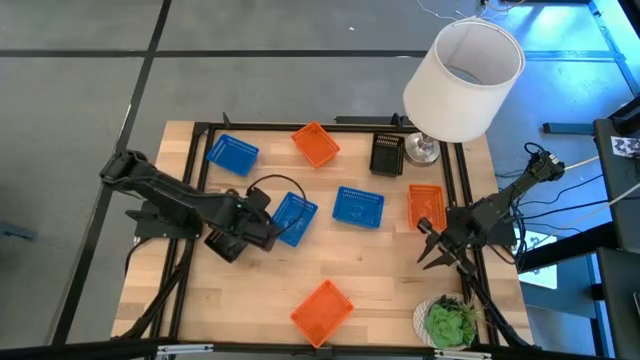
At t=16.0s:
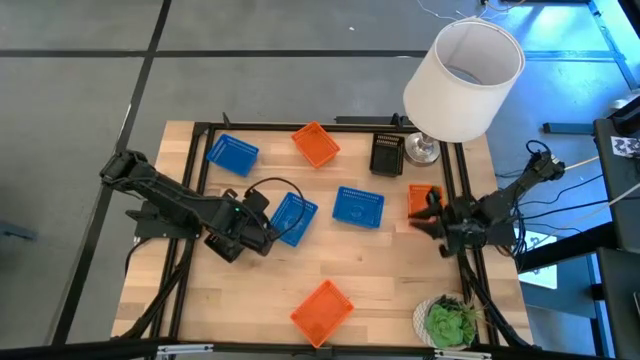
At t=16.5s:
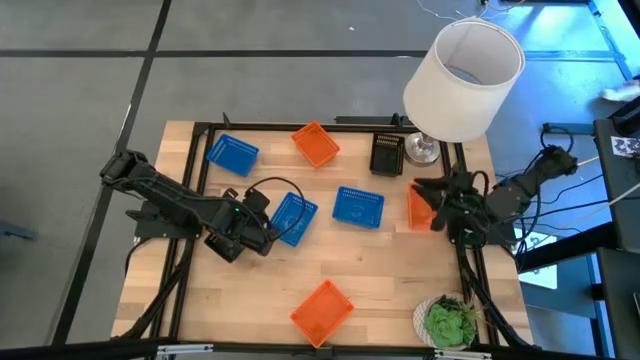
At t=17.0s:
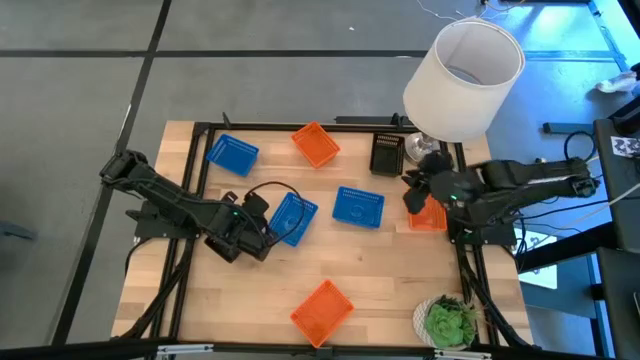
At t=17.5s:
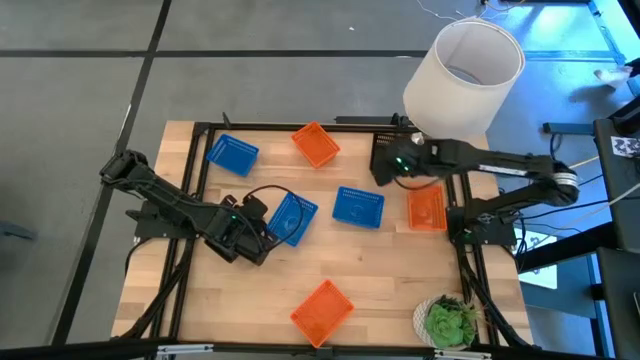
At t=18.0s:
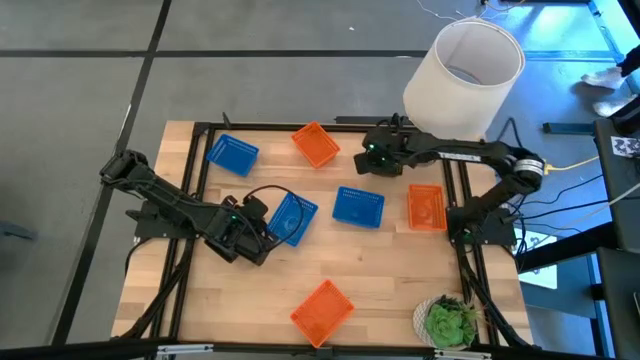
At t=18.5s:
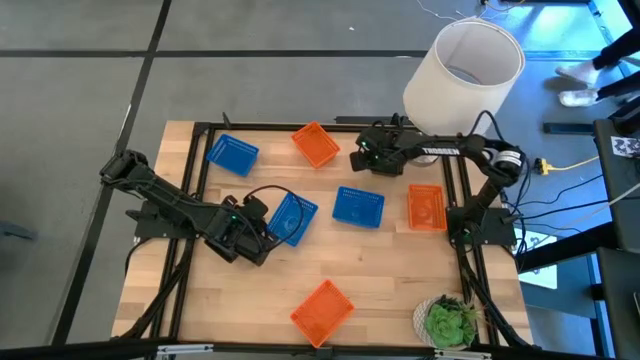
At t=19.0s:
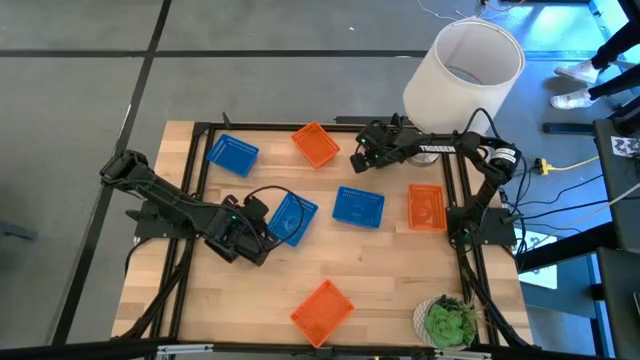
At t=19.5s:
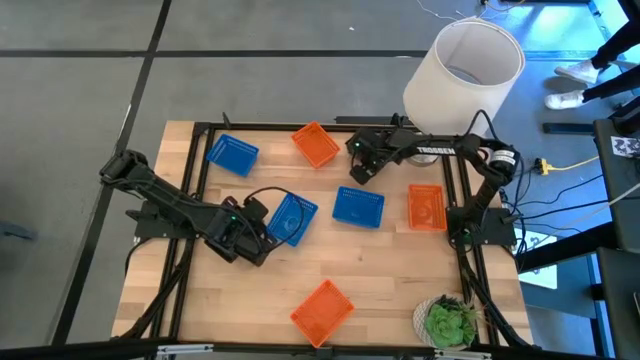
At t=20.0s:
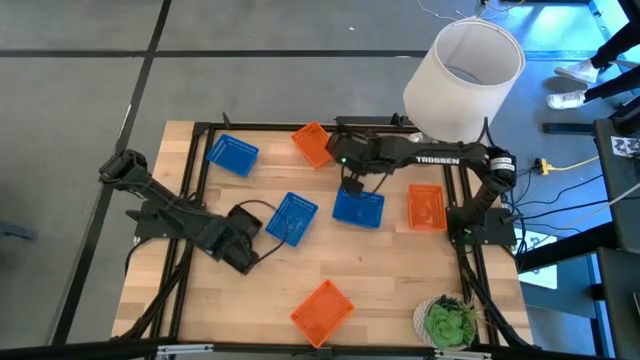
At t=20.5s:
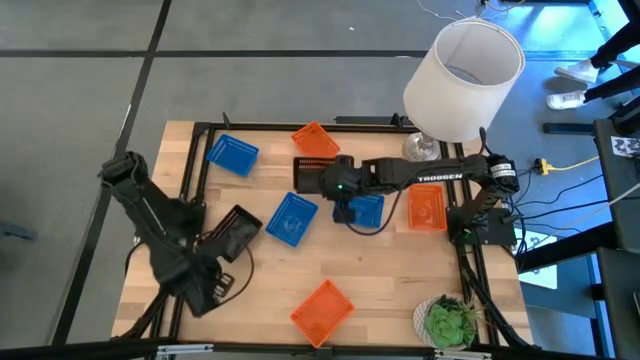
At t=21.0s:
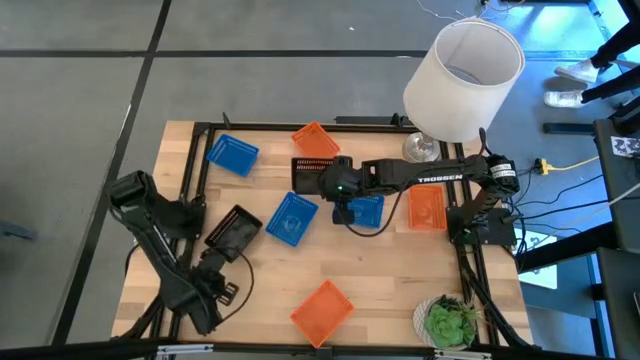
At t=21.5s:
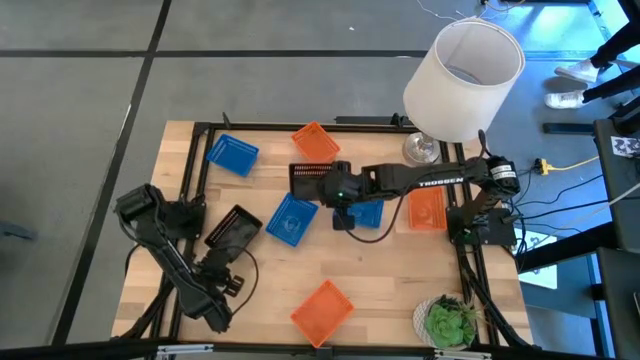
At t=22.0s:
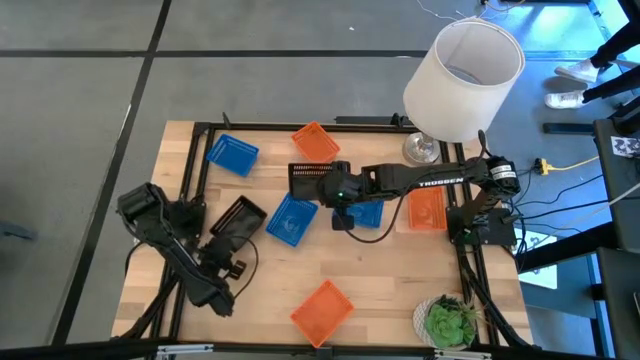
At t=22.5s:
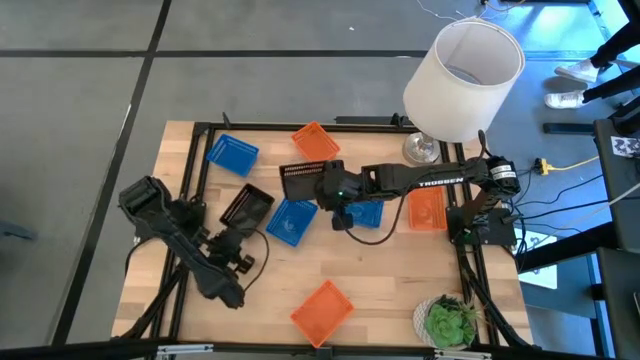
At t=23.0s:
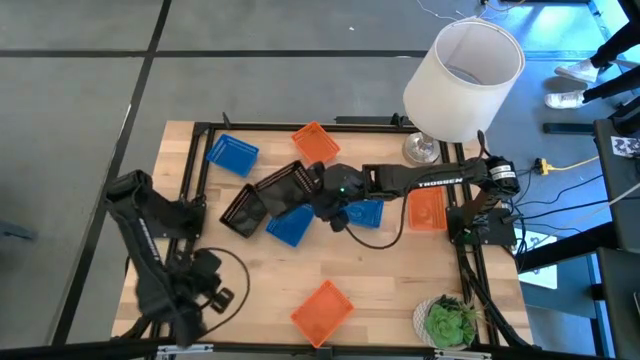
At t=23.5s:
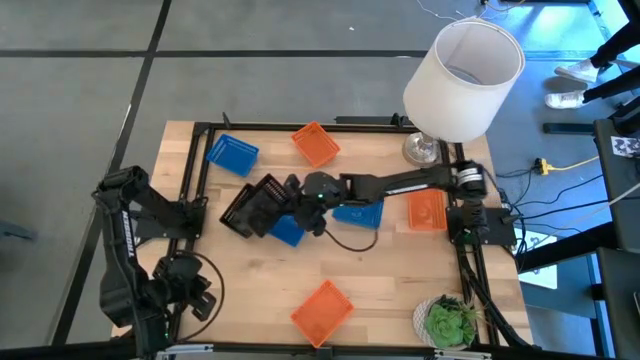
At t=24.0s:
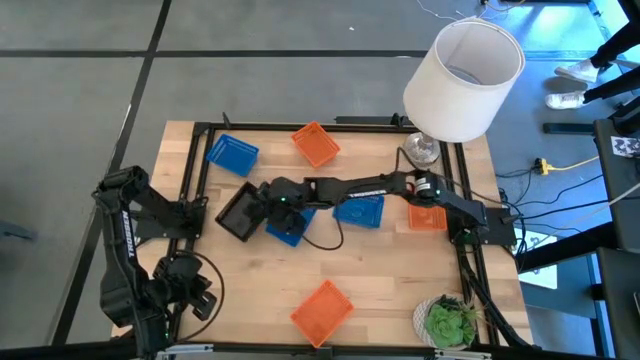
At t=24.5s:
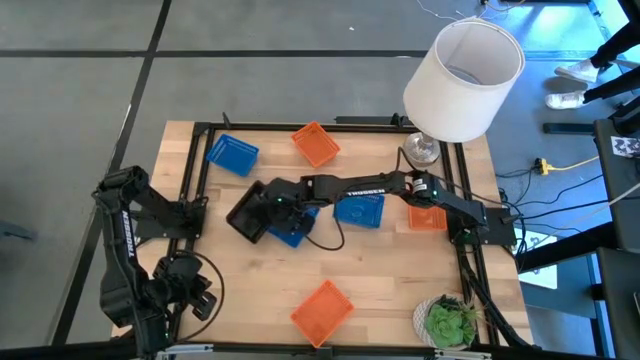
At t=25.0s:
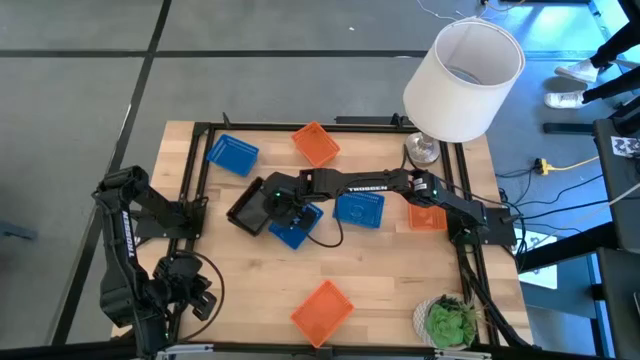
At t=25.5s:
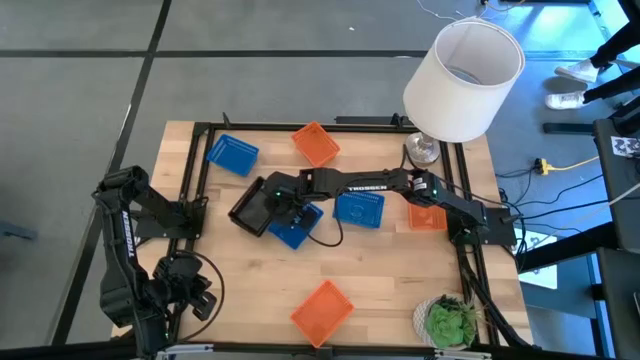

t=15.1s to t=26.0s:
Stack the top right black bin on the middle black bin

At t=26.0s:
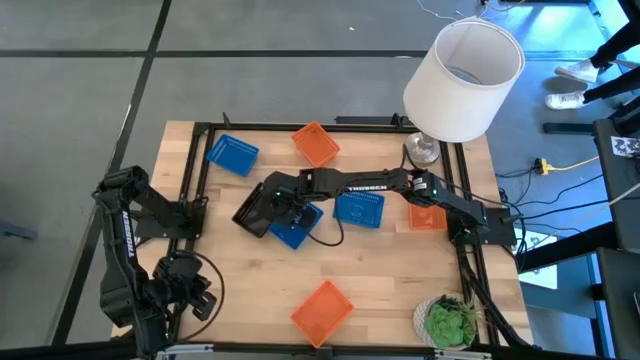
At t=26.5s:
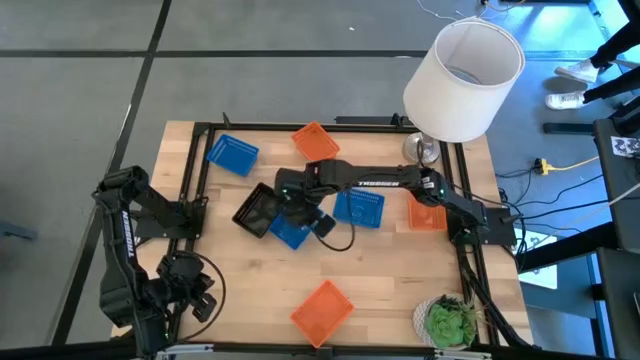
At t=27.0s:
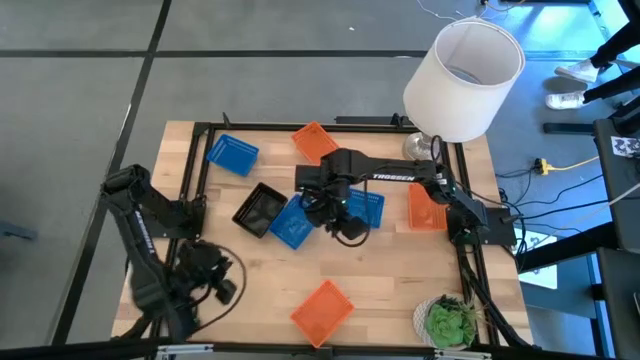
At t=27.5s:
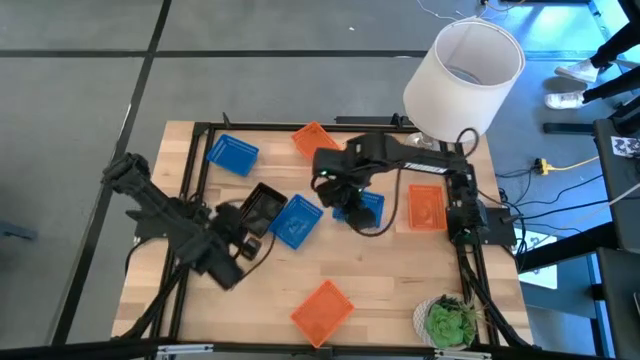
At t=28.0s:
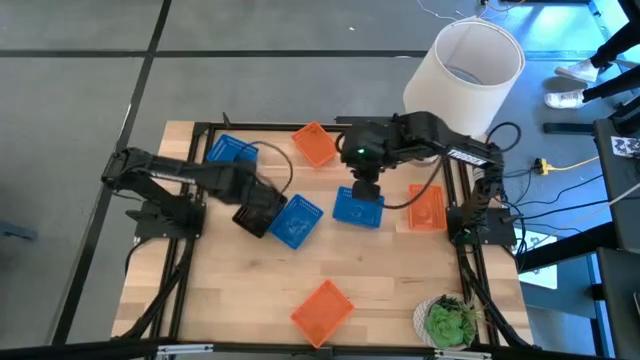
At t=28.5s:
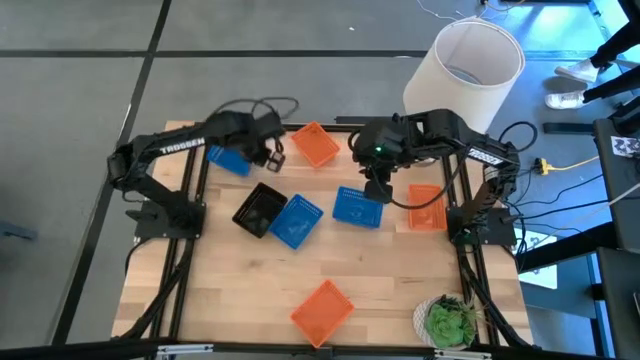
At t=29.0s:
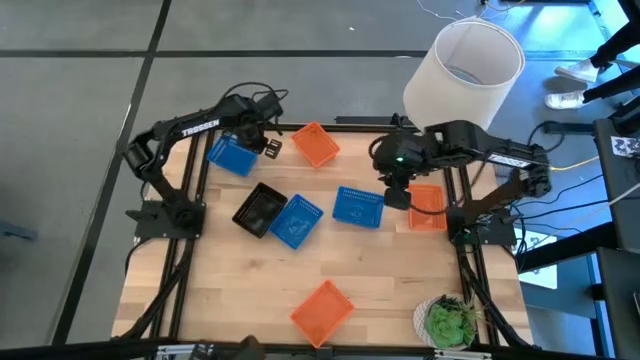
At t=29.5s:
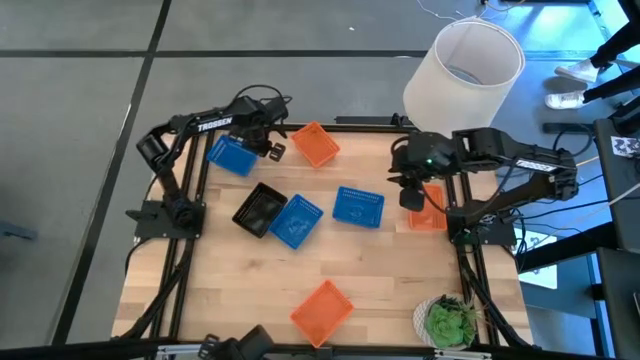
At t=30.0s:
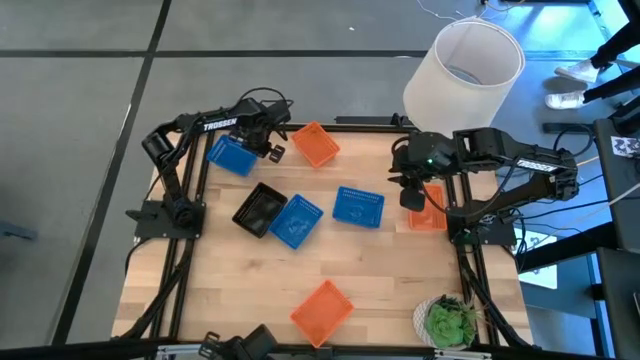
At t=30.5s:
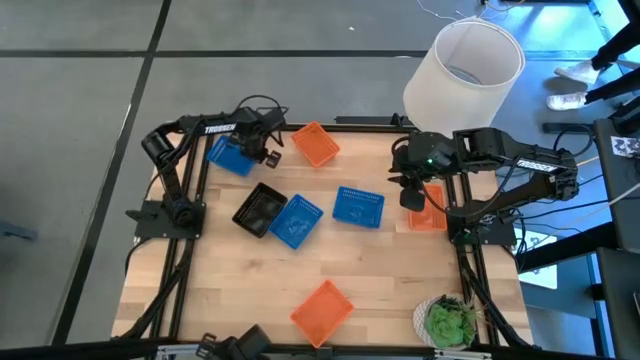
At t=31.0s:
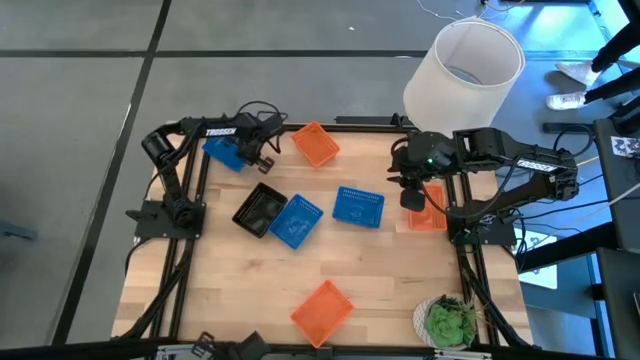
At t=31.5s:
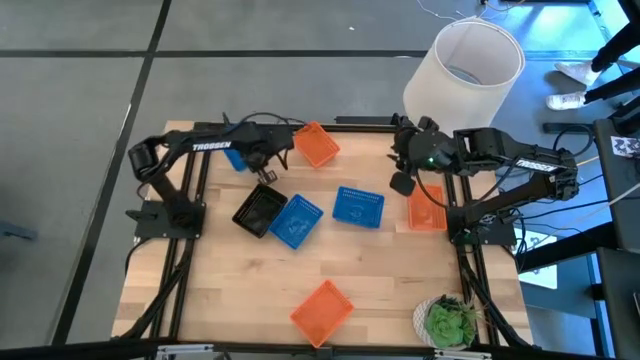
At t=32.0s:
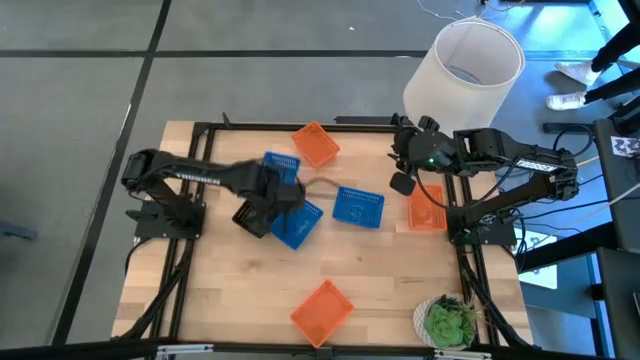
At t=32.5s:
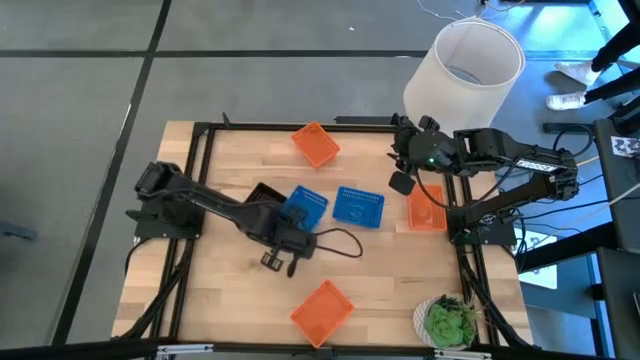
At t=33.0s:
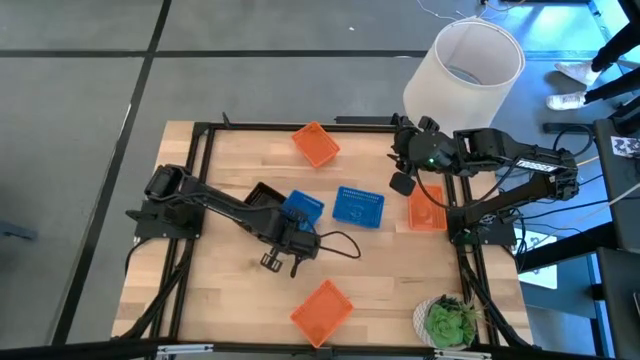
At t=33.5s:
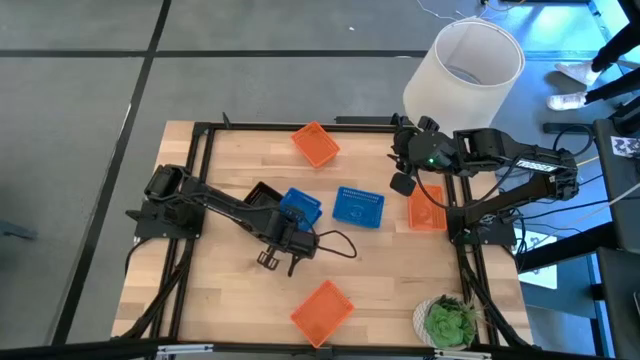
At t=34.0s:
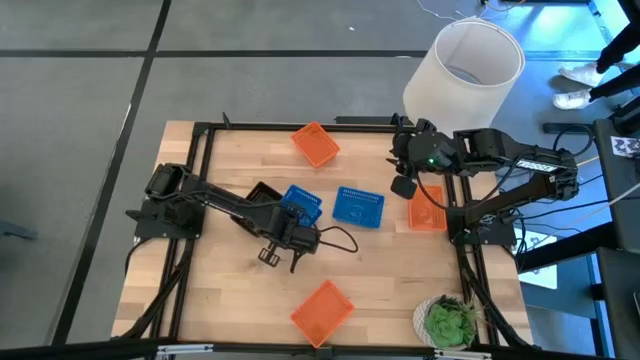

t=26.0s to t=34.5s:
Stack the top blue bin on the middle blue bin
